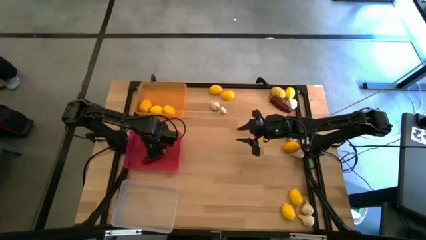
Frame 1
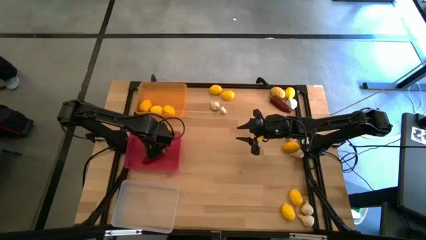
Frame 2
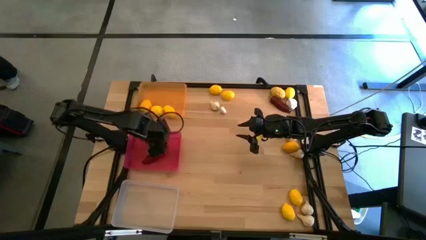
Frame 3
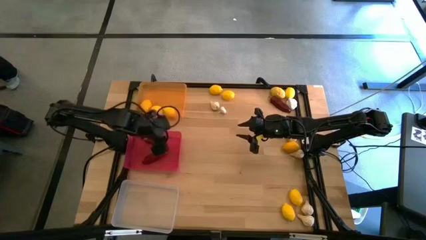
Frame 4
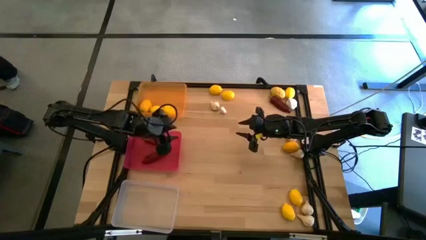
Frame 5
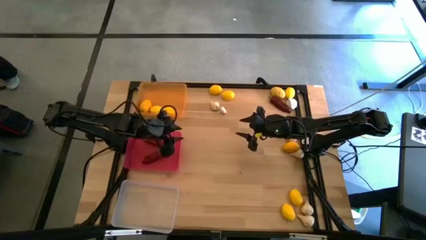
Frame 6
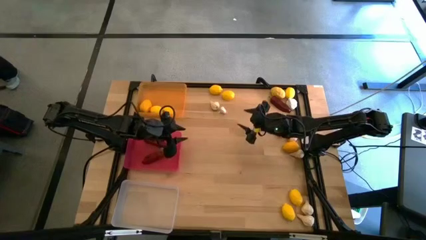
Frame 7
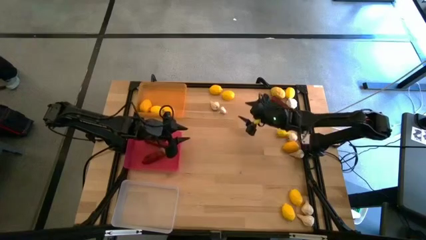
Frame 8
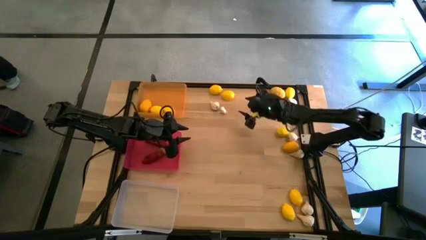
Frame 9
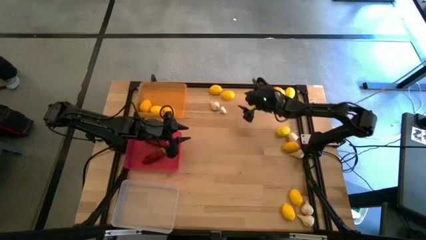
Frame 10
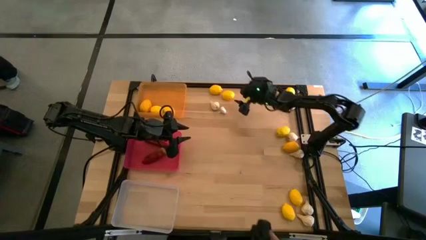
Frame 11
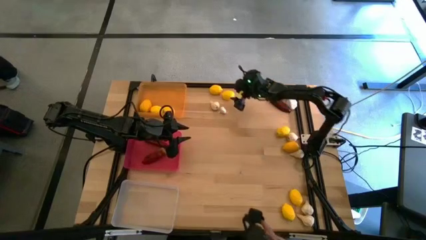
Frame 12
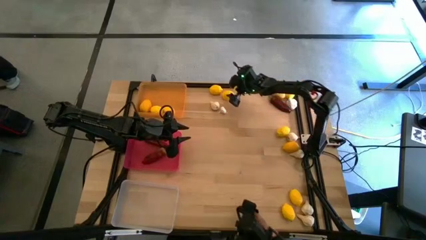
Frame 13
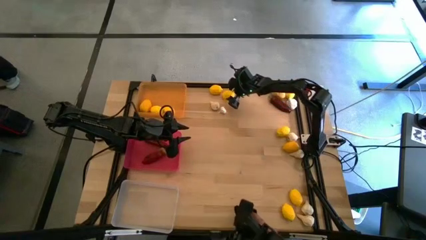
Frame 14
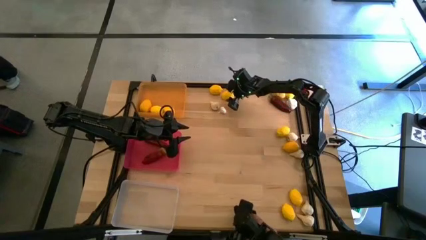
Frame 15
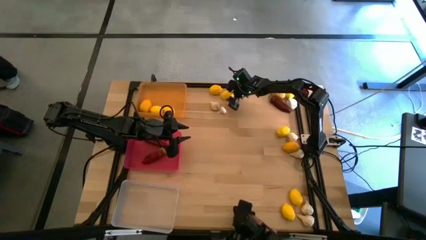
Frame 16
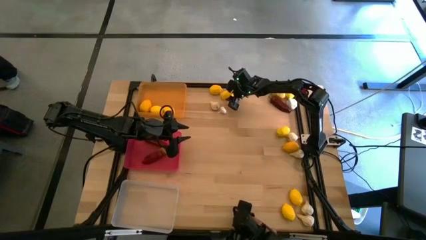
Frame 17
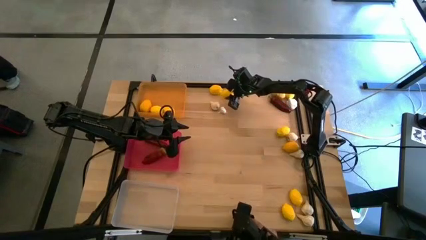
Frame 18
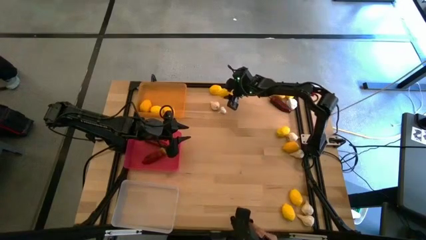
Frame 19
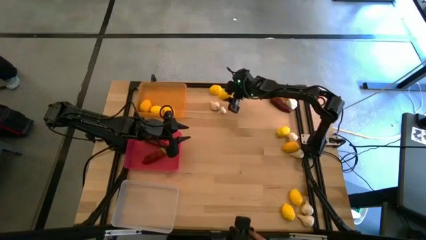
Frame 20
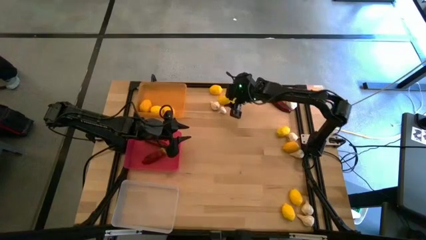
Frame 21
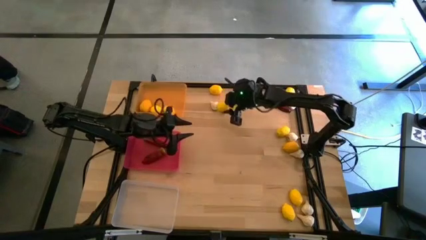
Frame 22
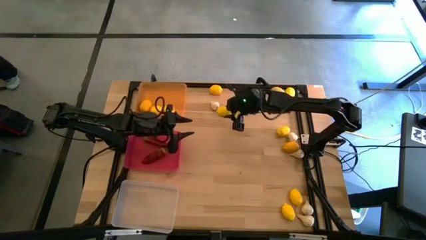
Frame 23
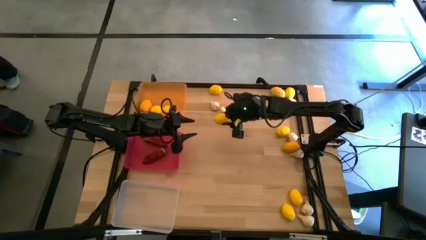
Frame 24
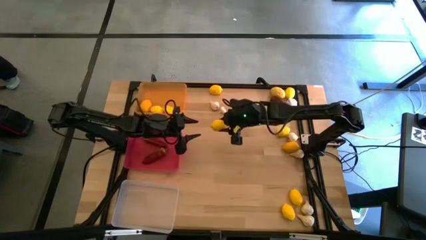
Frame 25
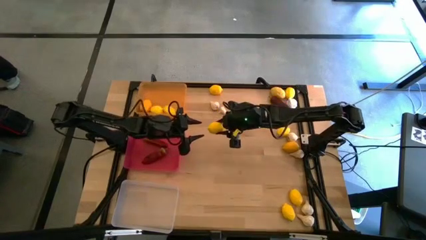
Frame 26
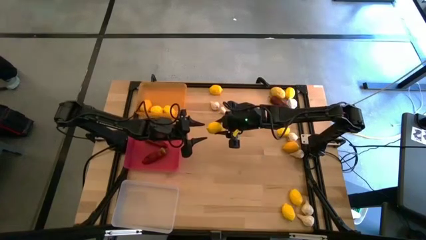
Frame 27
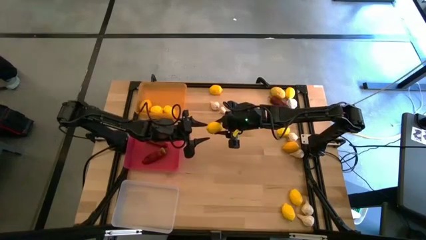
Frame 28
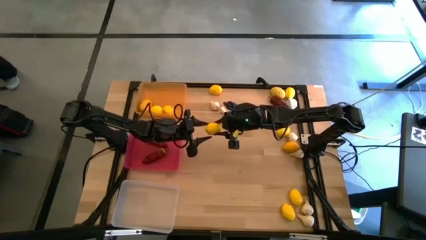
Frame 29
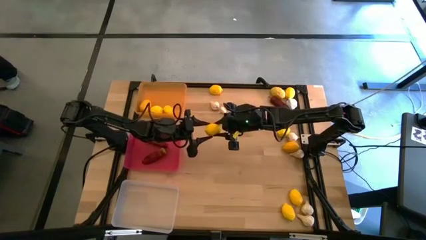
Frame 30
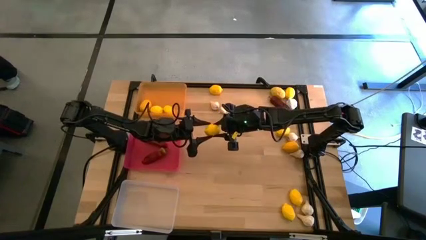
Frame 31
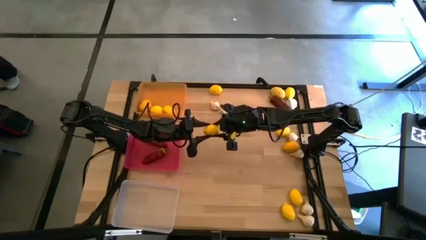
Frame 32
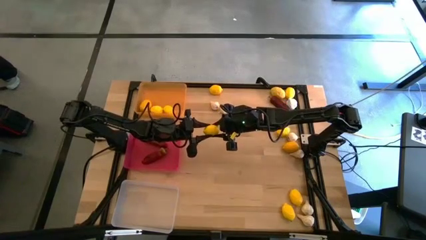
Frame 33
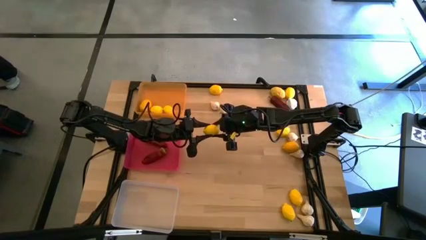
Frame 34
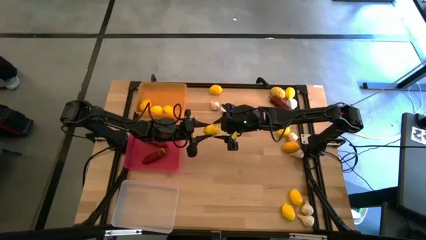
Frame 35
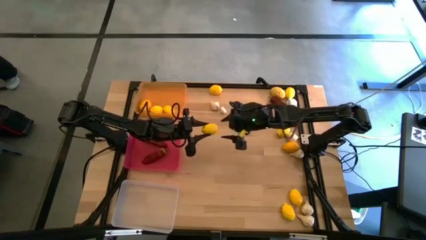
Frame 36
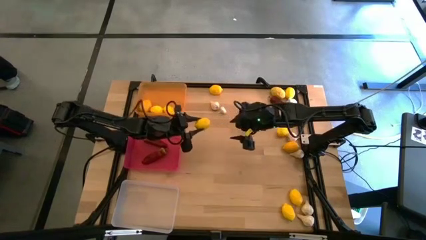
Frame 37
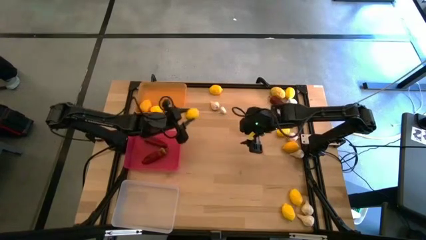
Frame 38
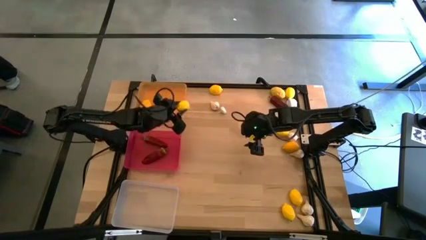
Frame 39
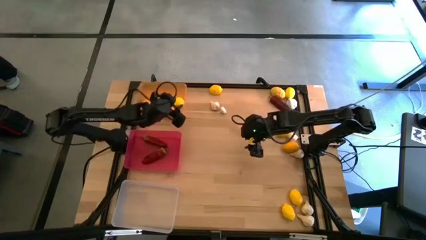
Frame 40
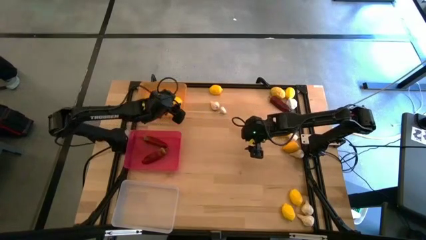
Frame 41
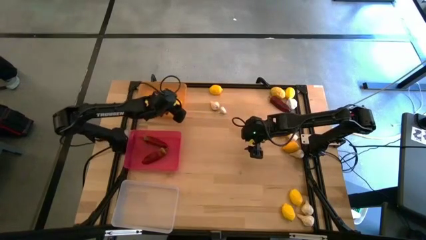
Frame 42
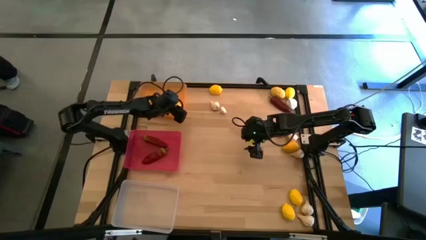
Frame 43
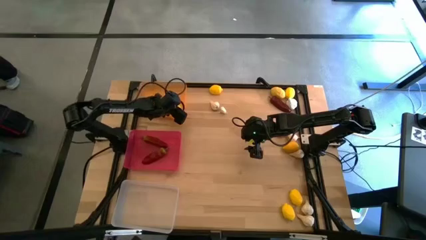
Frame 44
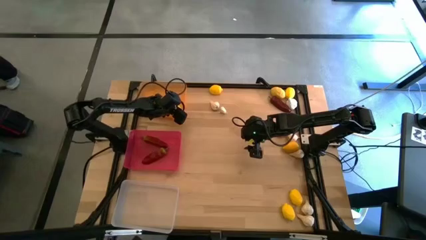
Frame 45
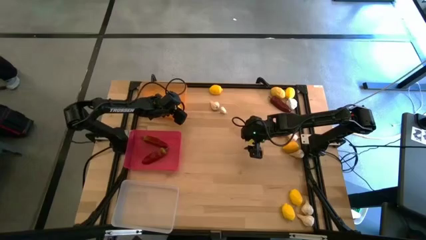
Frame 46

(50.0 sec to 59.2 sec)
Task: Sort produce into baskets
Put the lemon into the yellow bin

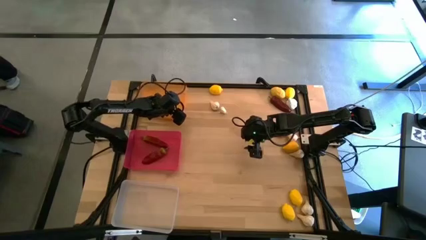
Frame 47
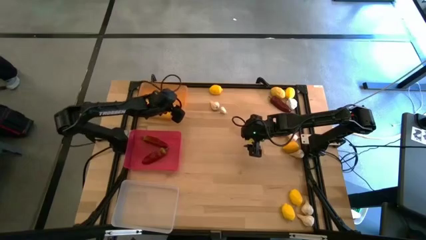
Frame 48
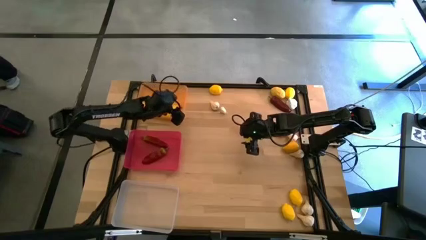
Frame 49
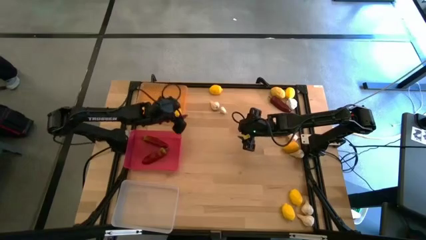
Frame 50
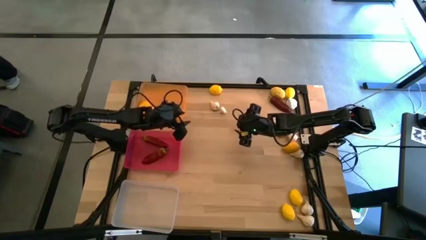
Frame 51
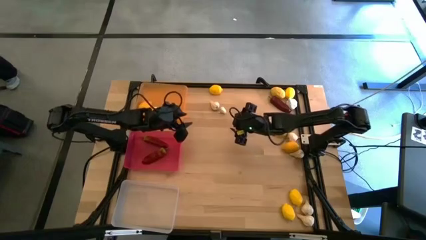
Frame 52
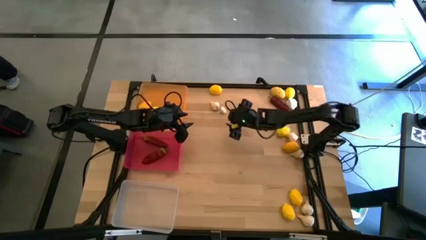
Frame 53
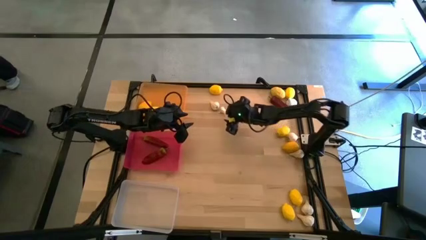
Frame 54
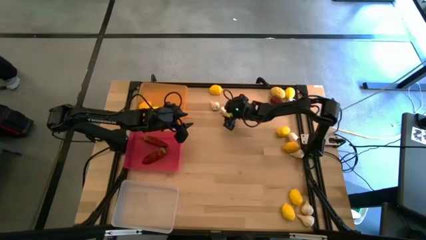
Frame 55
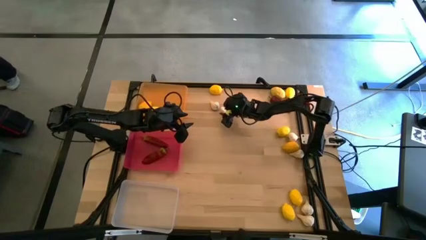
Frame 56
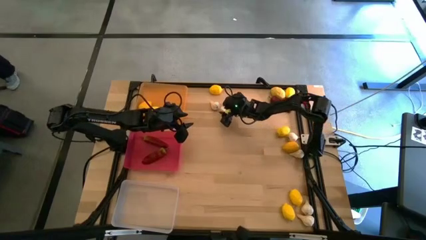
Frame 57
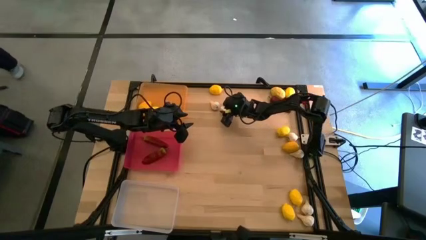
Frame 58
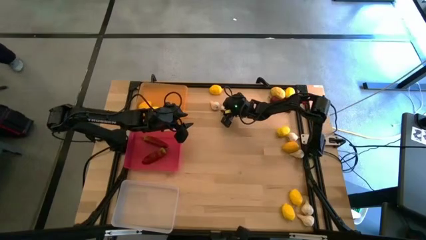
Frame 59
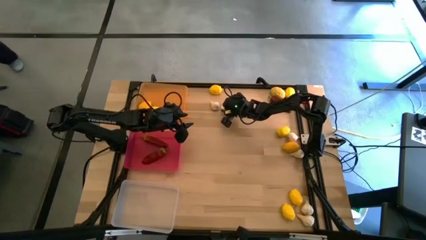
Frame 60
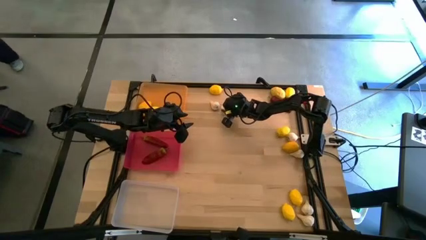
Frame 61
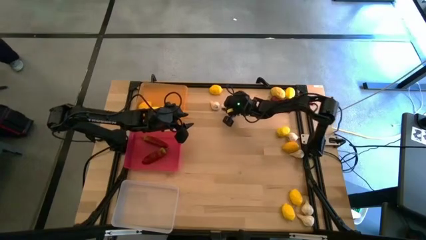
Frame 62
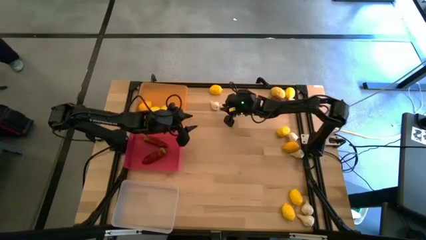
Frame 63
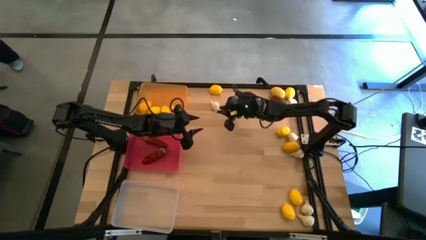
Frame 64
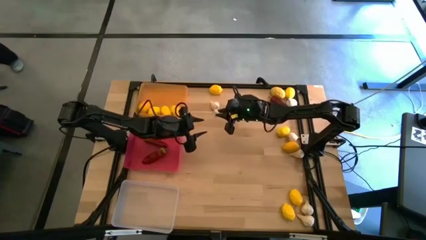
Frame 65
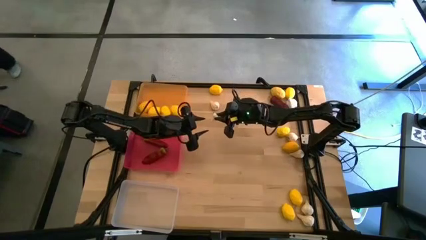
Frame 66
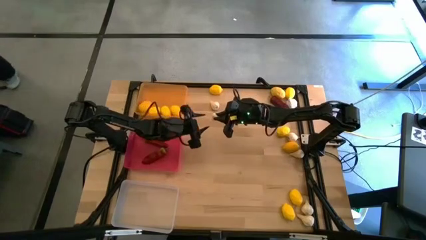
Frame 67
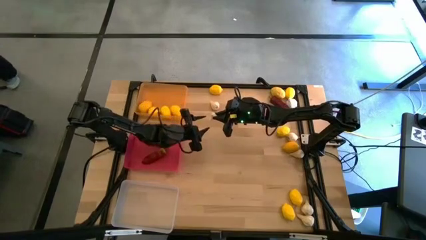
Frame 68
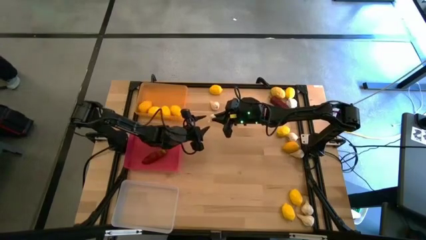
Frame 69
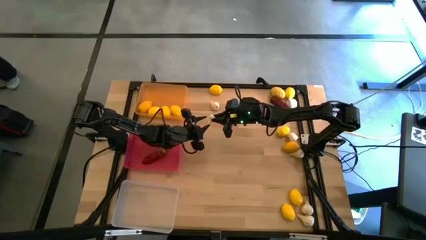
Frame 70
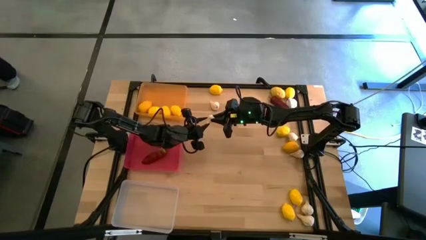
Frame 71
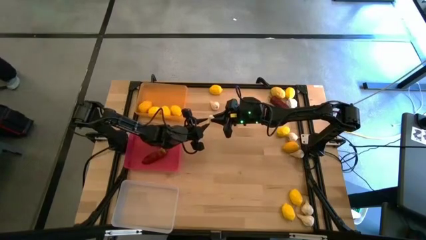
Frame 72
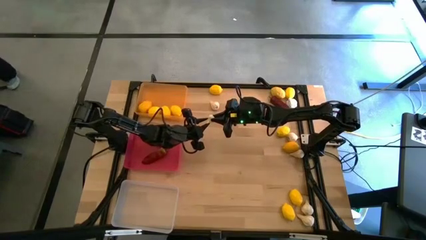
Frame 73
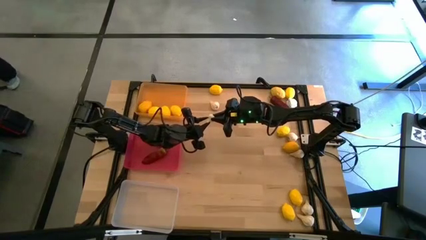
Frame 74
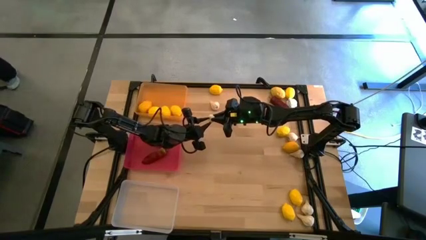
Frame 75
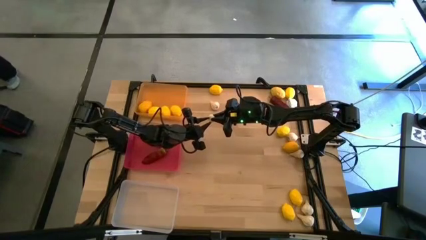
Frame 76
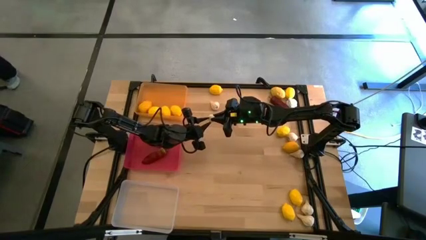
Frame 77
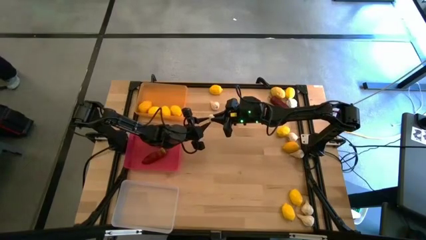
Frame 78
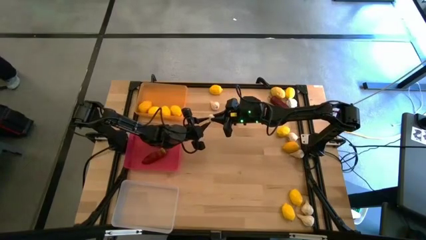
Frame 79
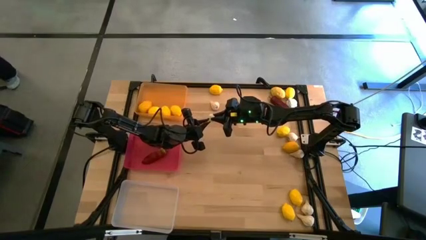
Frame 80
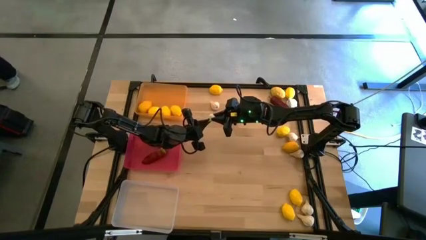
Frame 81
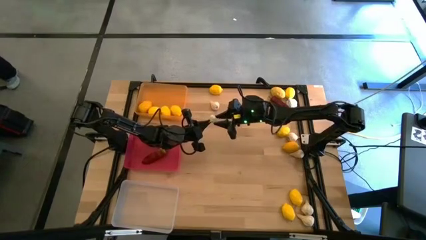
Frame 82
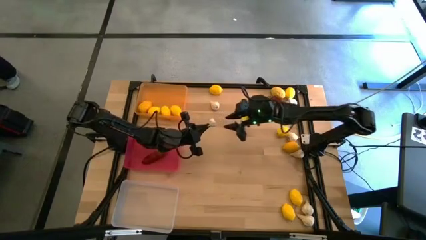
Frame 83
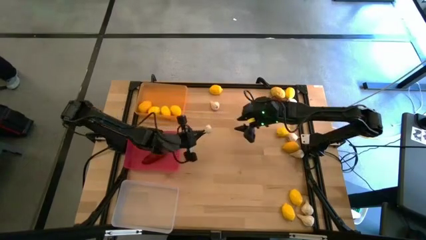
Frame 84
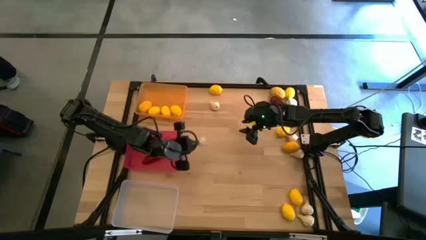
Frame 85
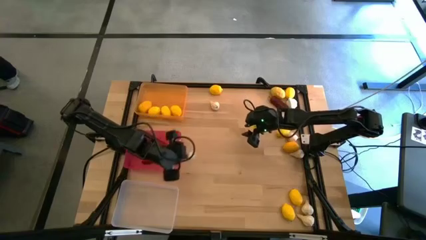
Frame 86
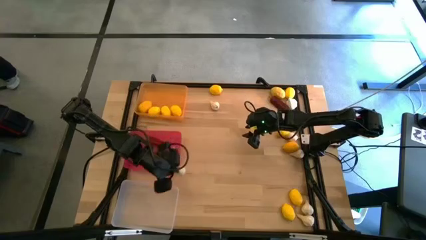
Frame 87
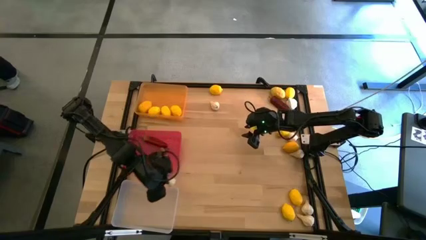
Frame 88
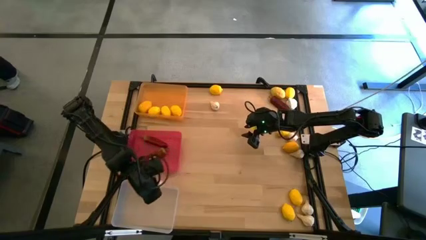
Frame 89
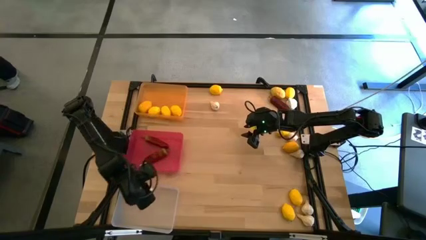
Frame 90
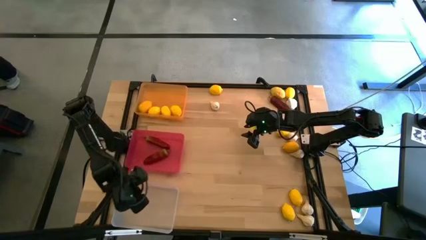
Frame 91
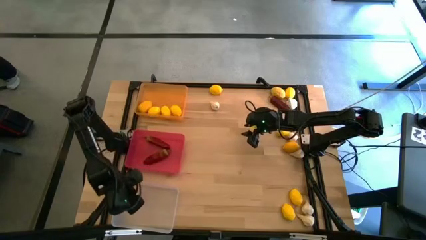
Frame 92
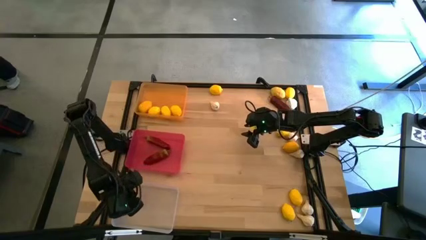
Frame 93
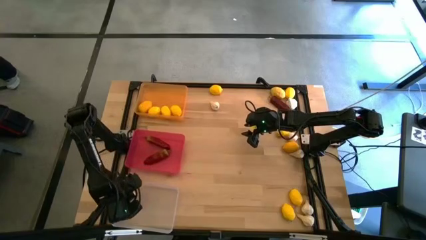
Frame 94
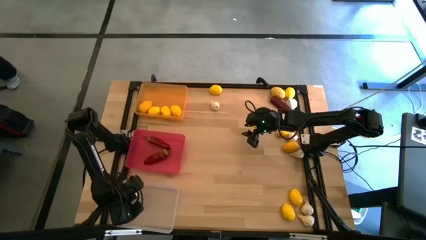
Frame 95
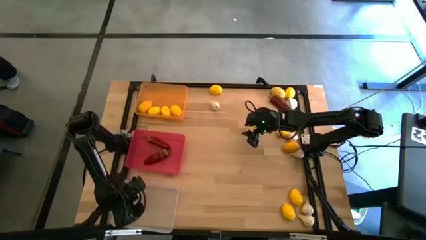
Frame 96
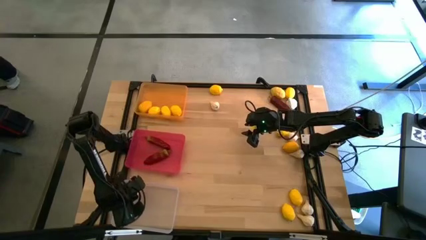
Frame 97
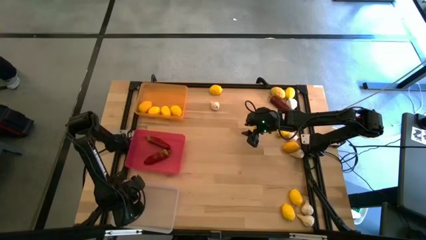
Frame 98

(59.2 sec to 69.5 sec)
Put the garlic into the transparent bin
